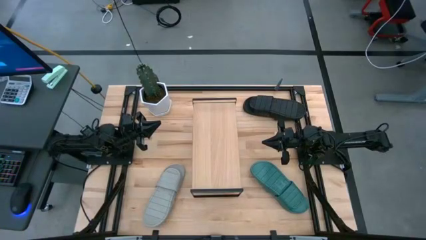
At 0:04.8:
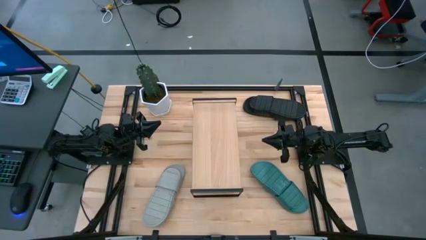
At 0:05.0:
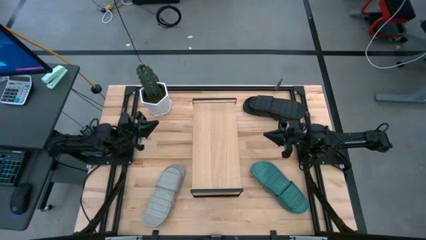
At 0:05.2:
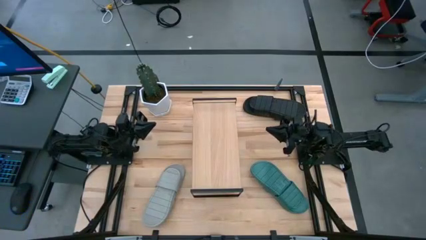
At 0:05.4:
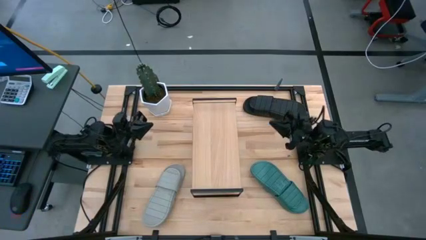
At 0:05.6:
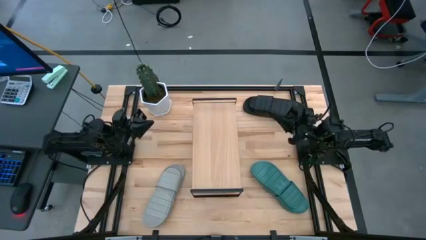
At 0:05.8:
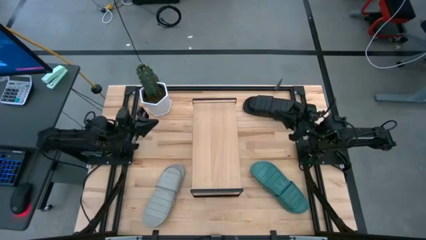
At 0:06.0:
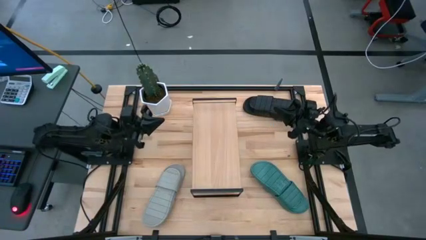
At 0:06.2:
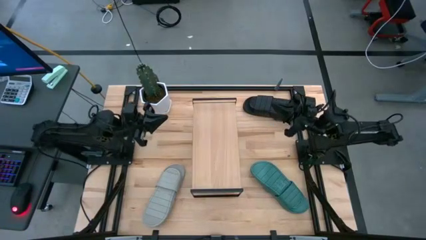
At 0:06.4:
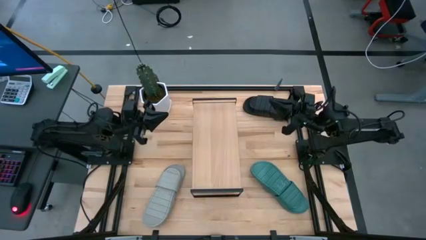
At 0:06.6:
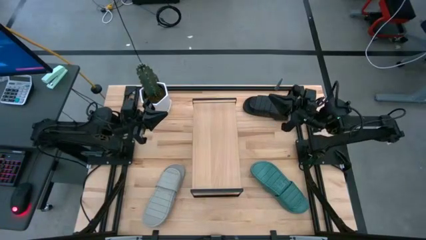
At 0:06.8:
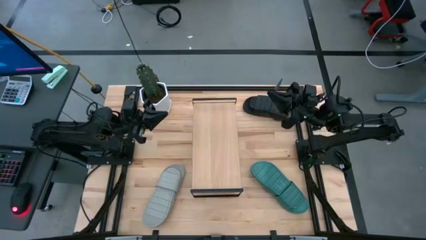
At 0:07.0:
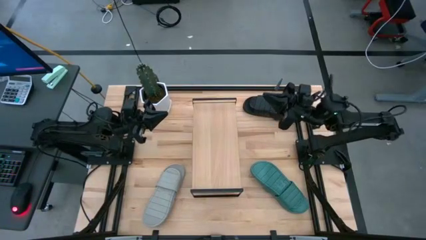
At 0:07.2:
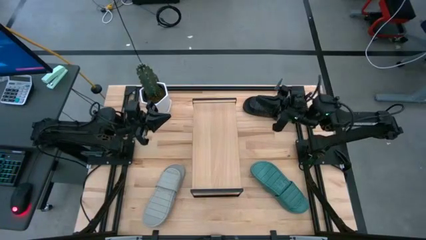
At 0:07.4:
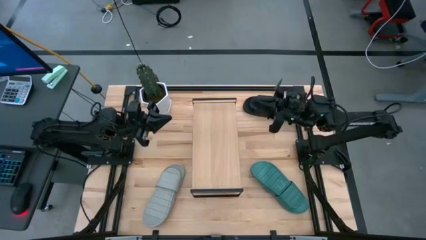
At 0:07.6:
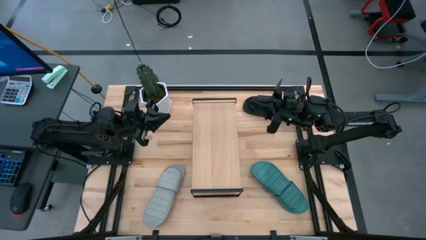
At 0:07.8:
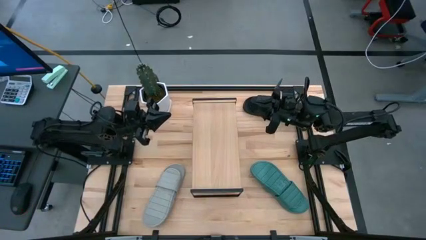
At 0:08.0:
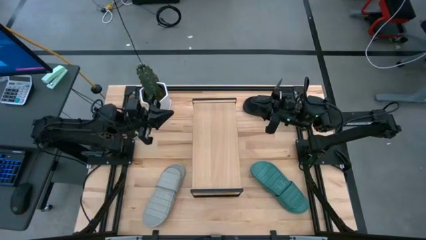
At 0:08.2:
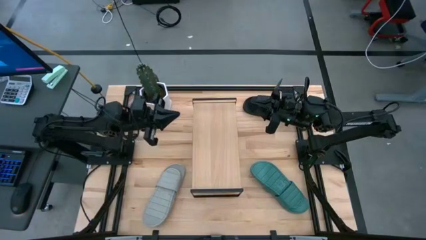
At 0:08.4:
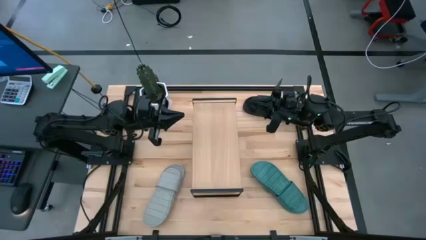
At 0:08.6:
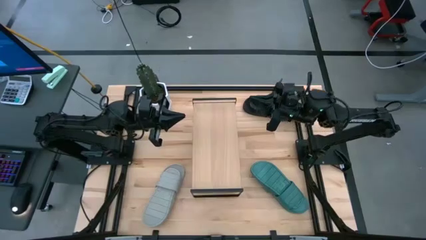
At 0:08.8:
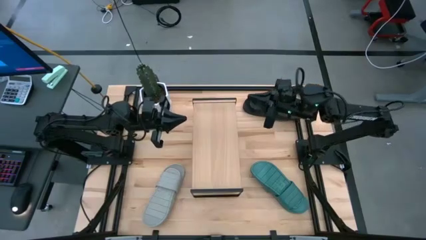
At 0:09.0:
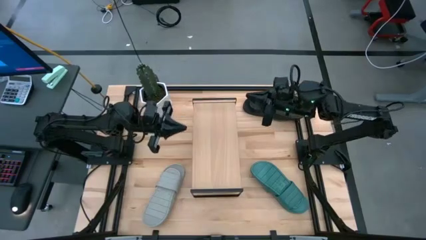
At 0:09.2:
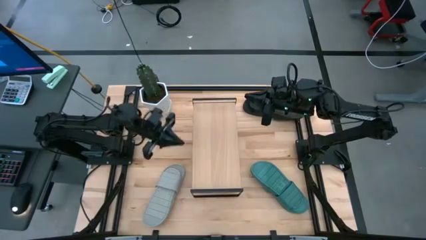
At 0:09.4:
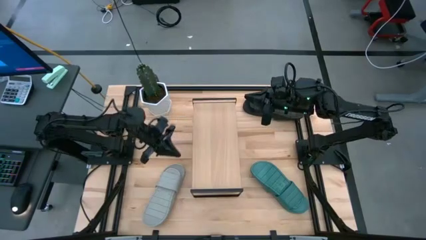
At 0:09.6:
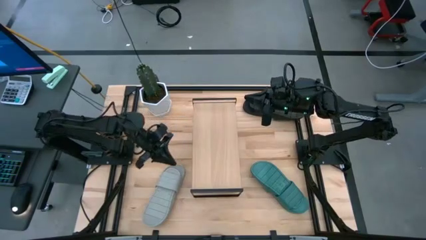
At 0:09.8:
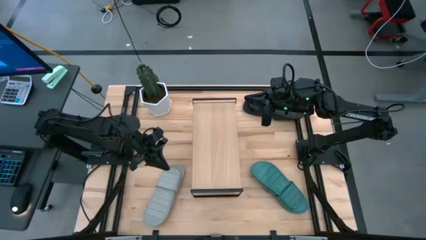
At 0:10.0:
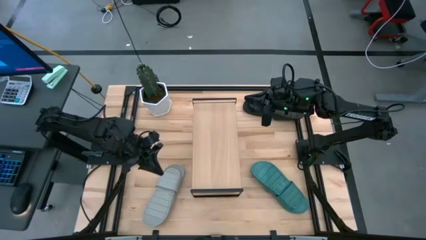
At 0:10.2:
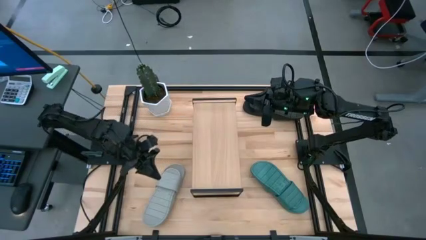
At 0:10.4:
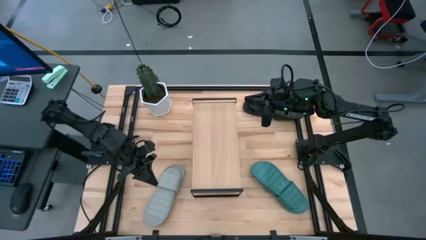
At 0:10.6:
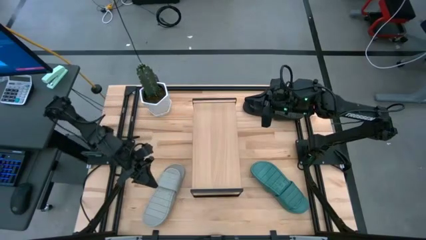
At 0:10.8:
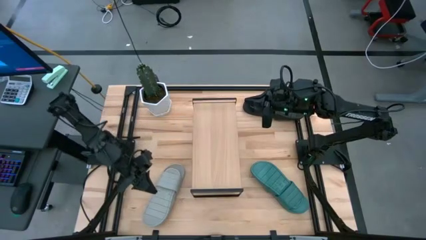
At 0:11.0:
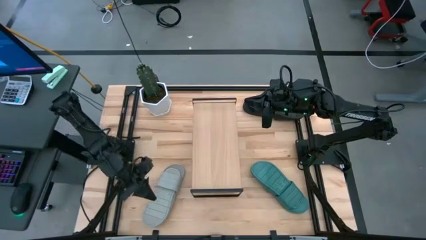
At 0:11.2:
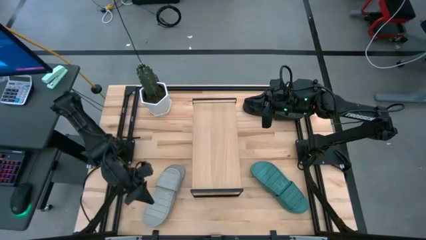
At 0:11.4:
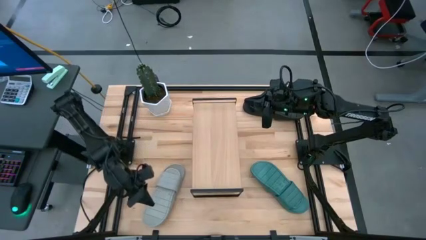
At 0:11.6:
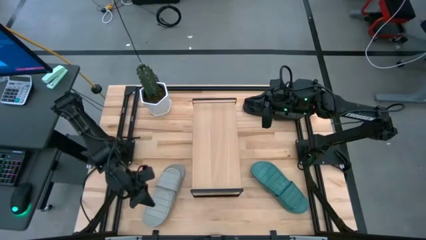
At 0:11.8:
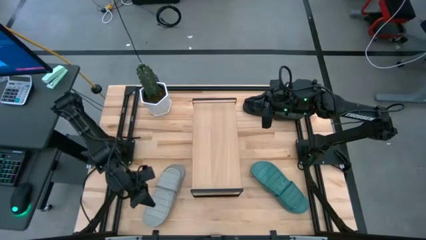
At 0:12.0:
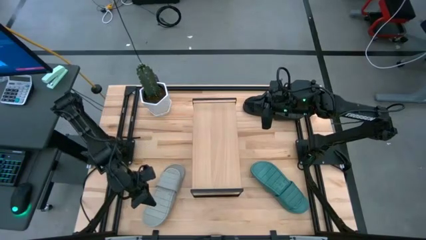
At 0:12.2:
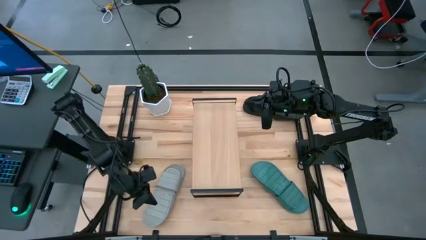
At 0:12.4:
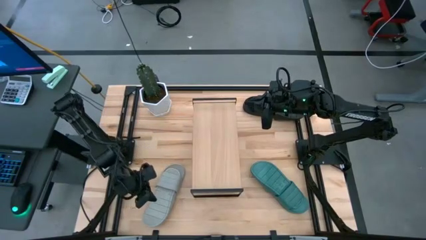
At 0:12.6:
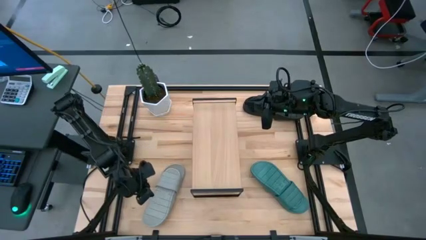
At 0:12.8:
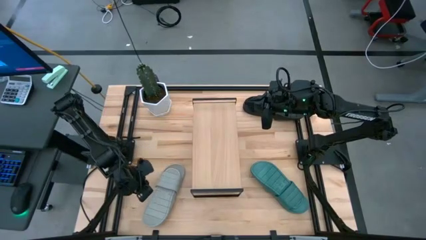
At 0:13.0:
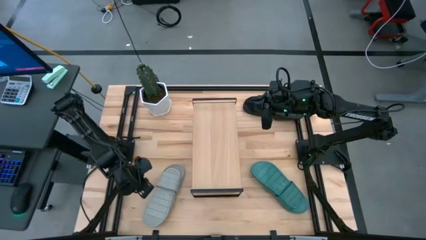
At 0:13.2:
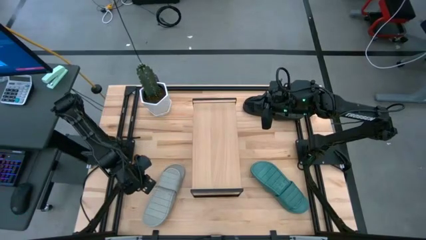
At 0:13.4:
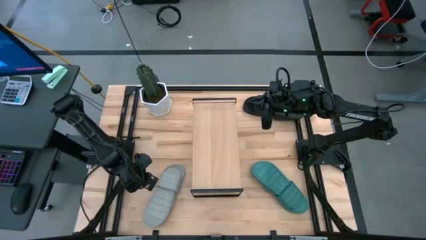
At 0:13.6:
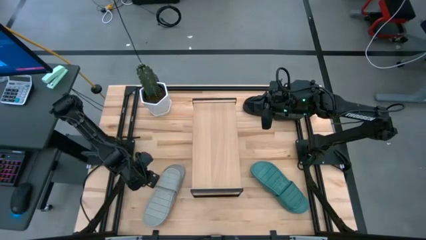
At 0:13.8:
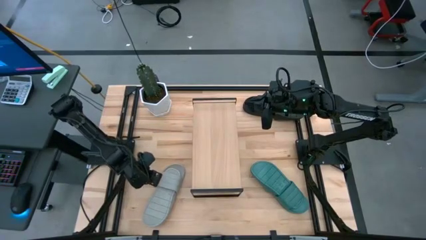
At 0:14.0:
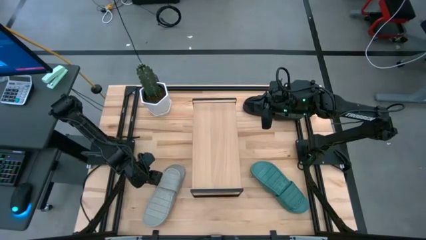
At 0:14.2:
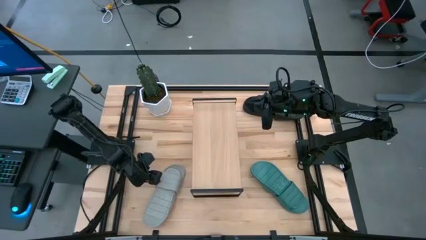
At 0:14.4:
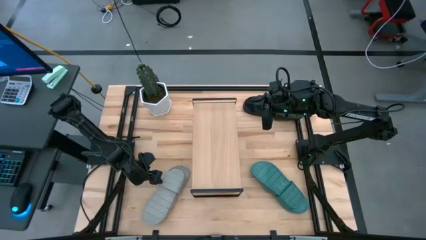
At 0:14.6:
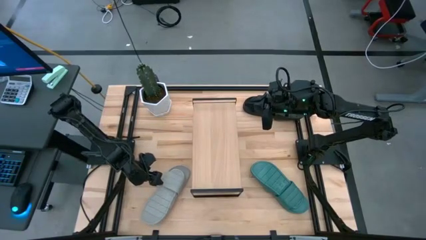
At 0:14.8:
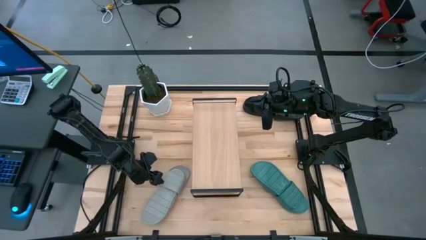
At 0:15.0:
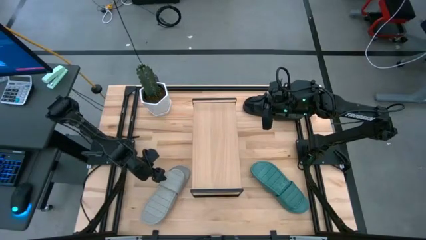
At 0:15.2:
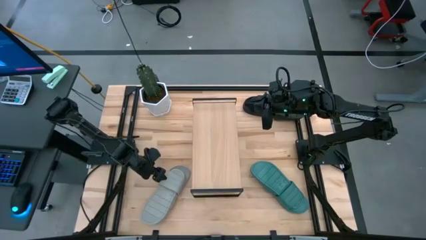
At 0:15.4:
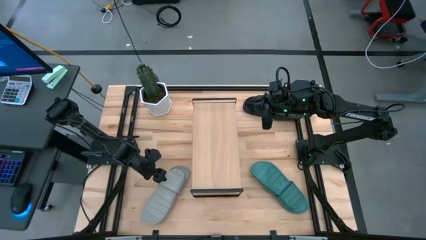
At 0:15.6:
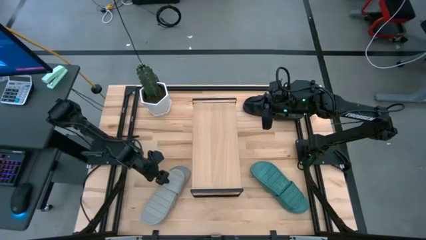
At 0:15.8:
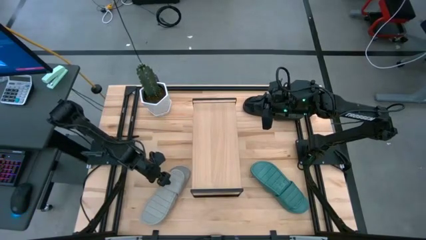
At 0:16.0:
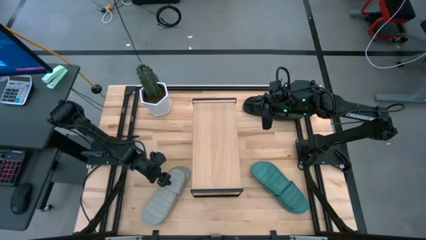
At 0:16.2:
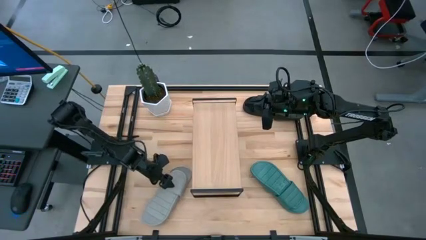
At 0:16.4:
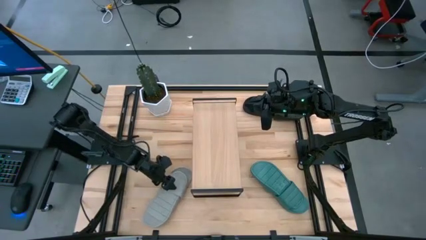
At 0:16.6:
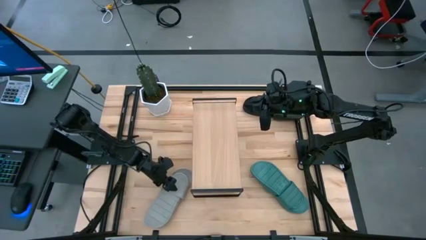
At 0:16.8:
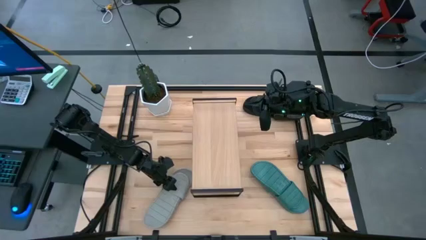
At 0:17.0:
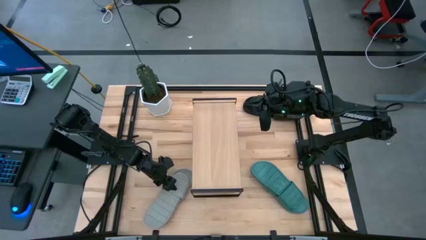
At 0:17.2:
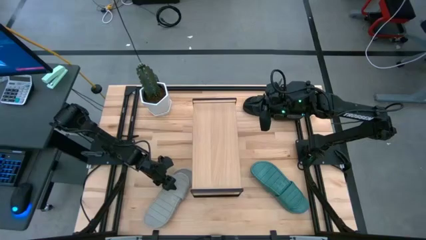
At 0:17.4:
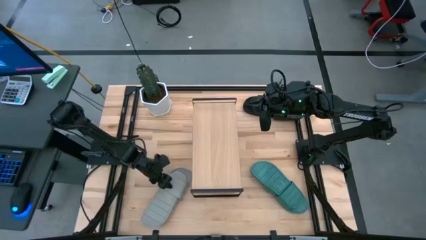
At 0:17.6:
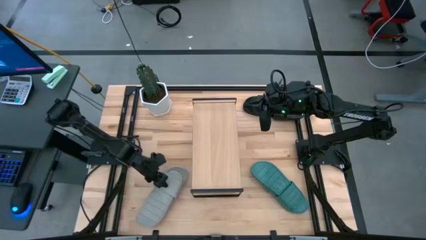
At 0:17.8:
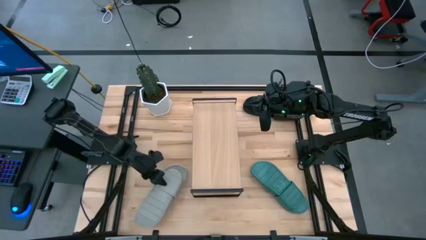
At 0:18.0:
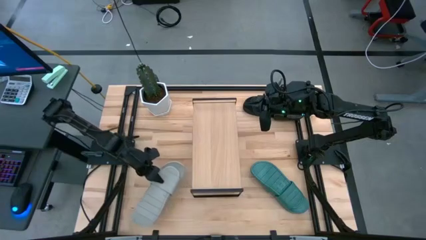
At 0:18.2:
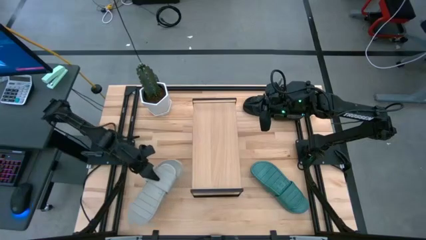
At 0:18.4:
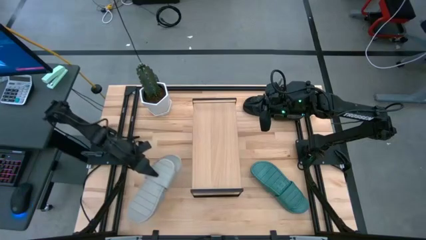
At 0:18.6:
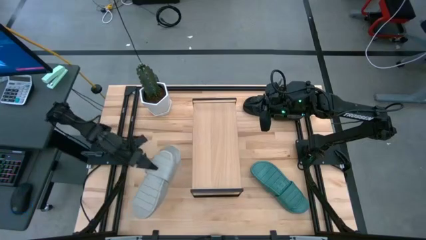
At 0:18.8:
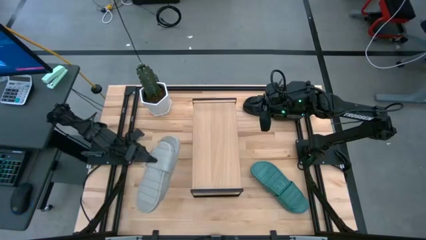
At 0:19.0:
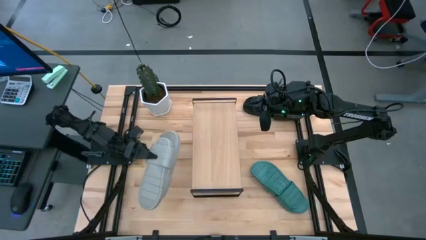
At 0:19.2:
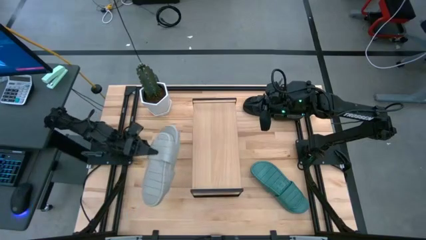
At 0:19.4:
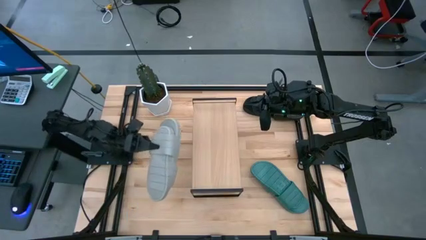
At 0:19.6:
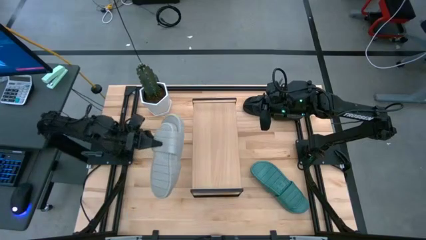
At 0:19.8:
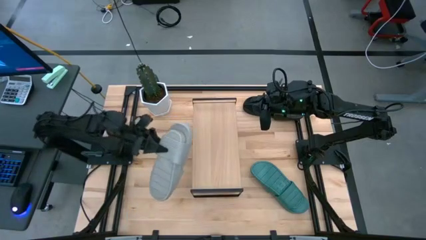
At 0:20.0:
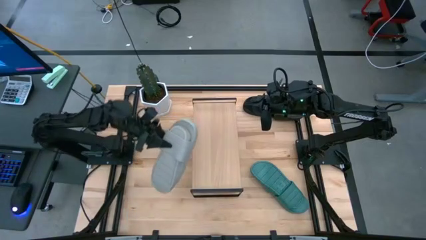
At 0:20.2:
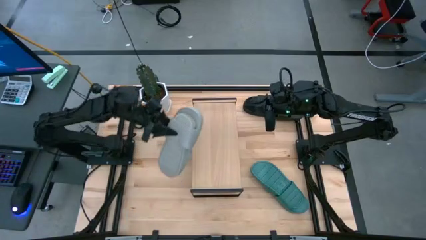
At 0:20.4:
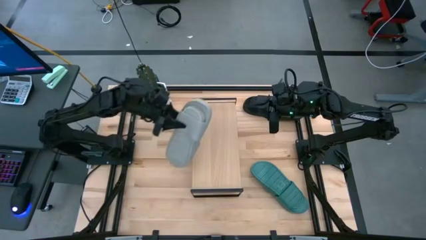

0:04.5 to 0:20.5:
Task: Pick and place slippers onto the shelf
Put the gray pair of slippers on the shelf
